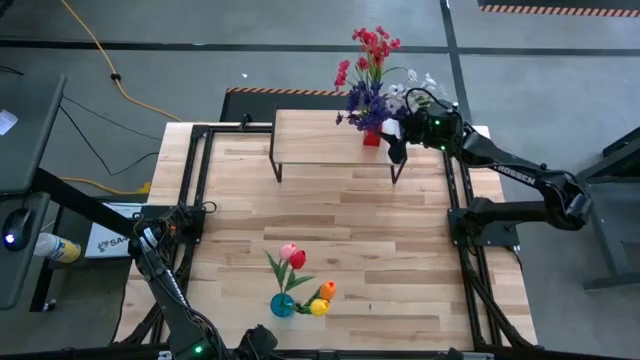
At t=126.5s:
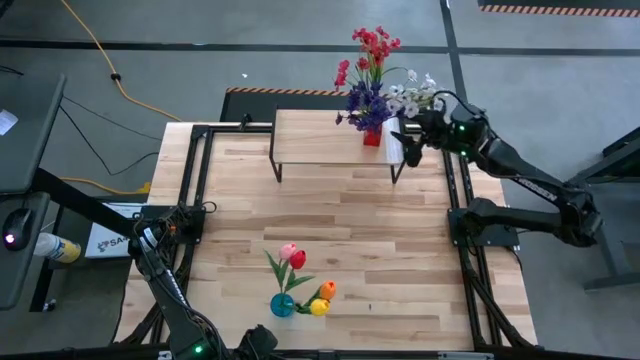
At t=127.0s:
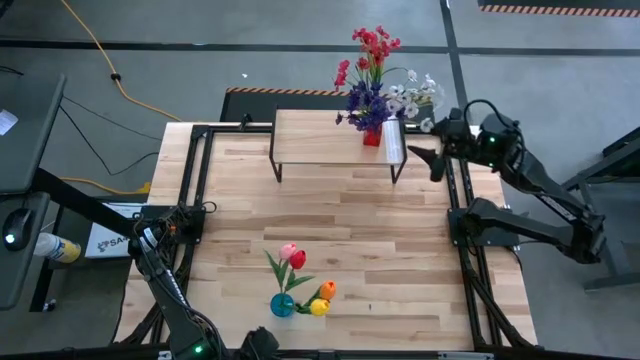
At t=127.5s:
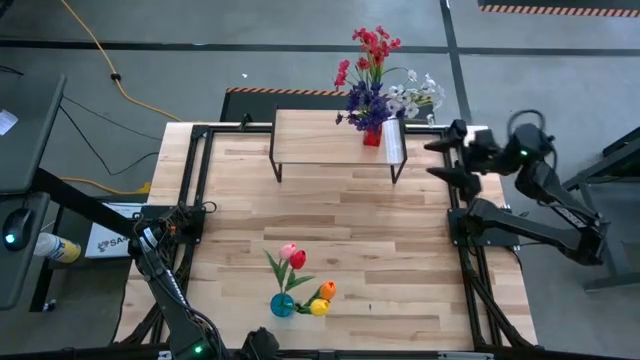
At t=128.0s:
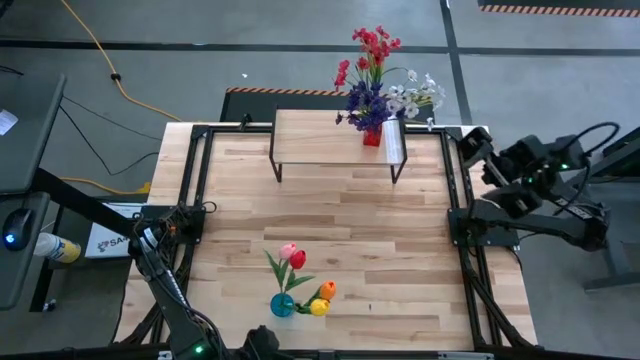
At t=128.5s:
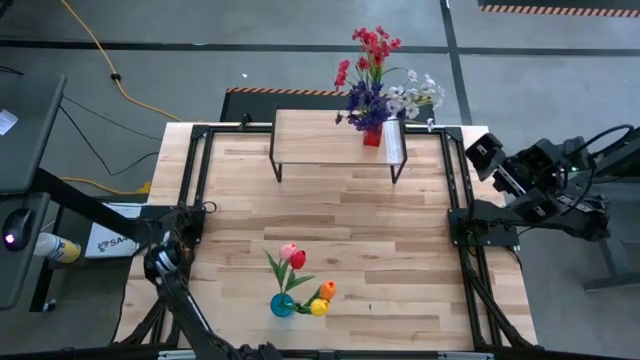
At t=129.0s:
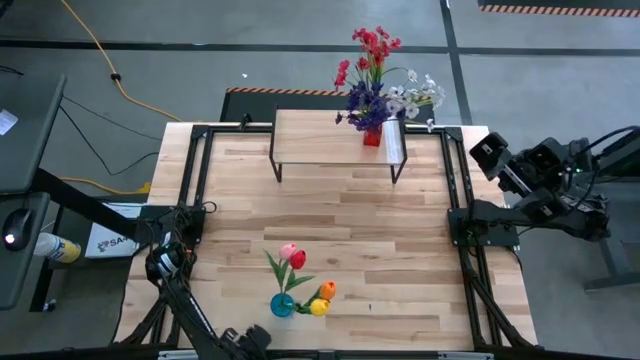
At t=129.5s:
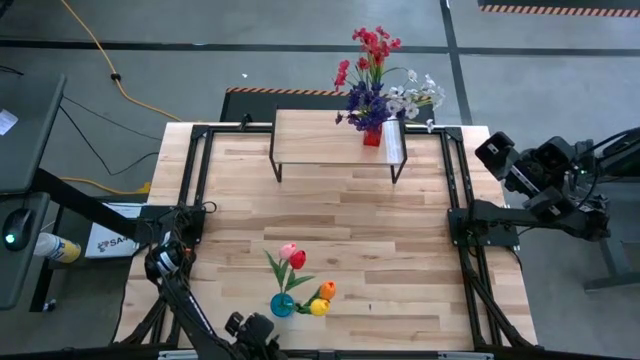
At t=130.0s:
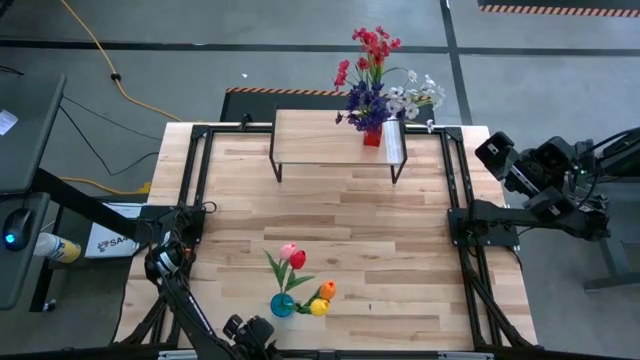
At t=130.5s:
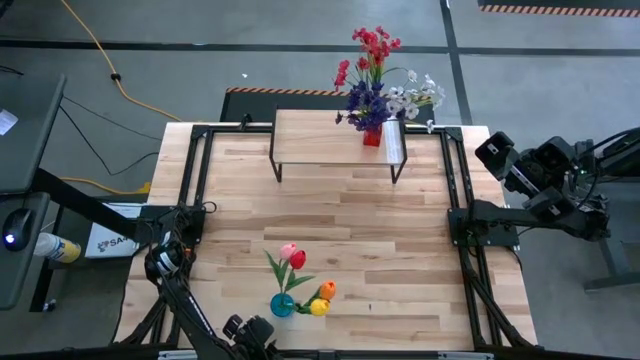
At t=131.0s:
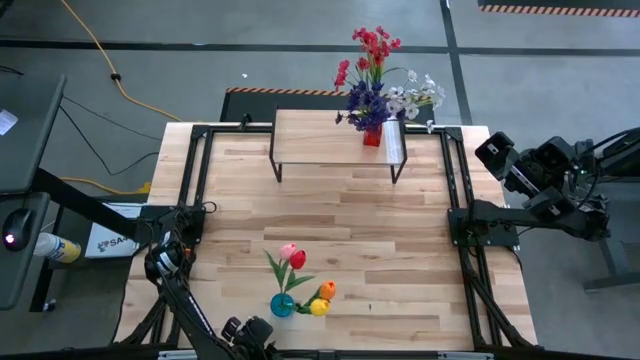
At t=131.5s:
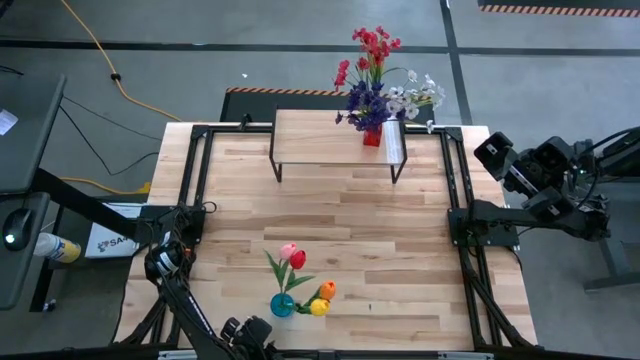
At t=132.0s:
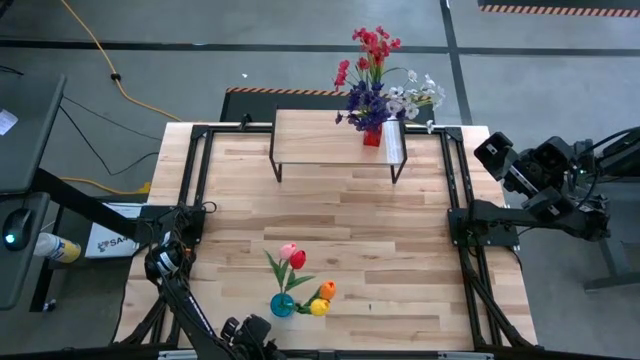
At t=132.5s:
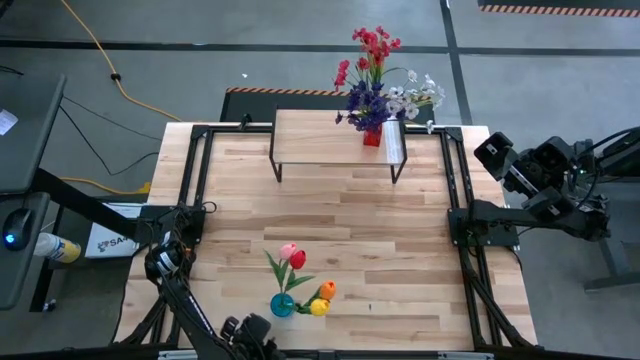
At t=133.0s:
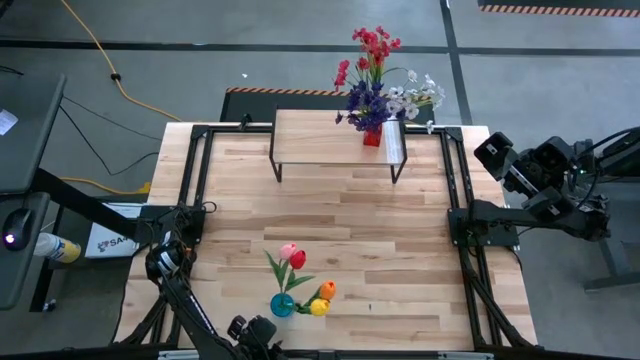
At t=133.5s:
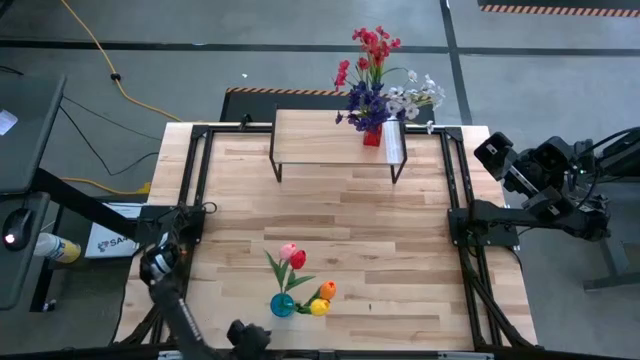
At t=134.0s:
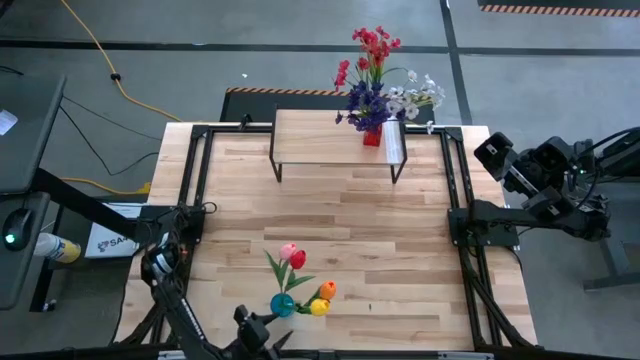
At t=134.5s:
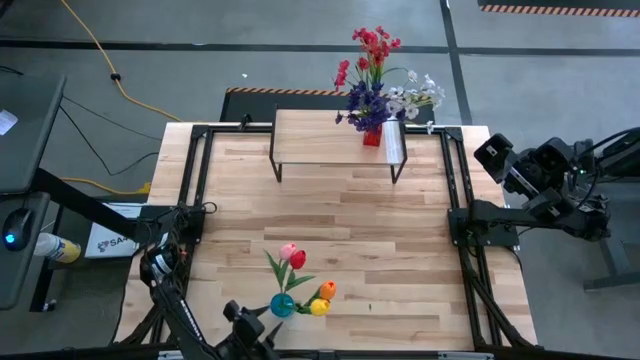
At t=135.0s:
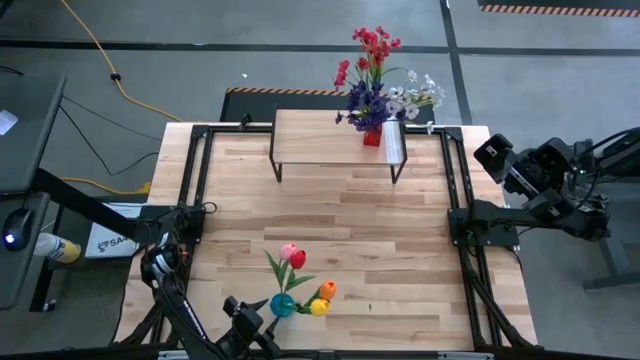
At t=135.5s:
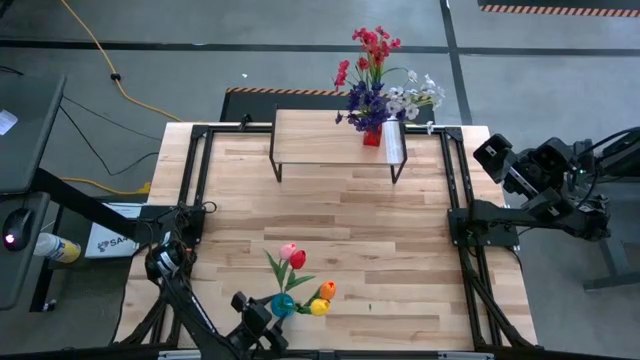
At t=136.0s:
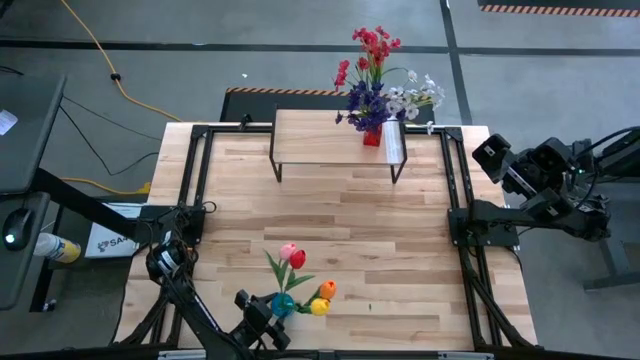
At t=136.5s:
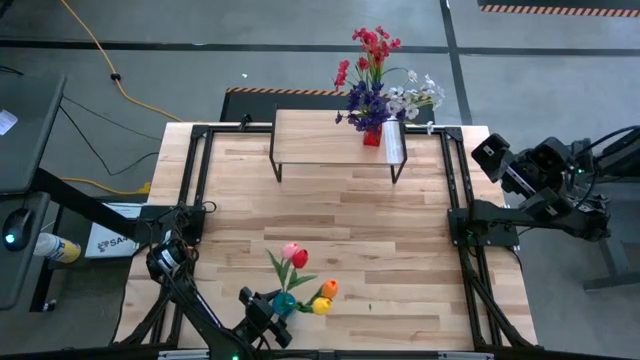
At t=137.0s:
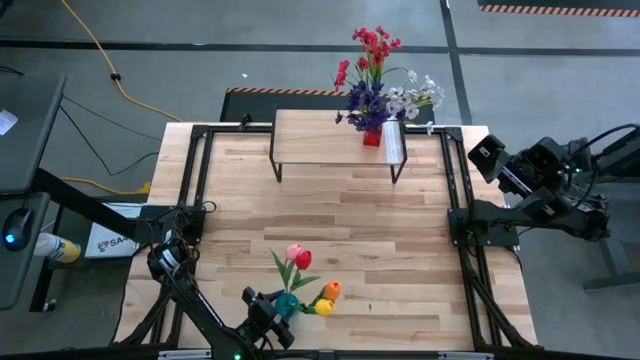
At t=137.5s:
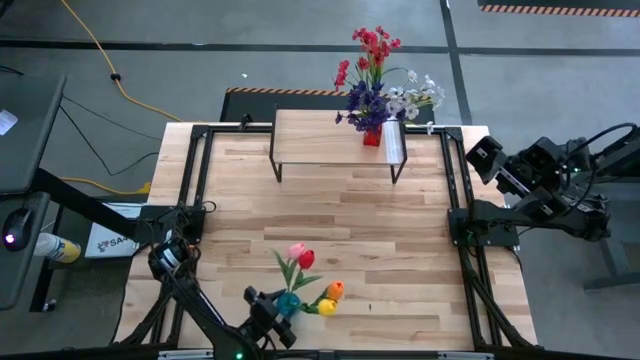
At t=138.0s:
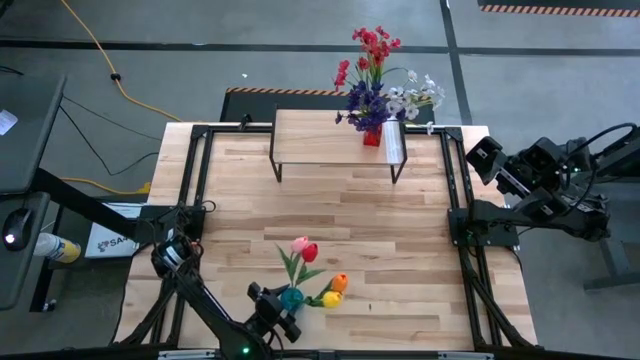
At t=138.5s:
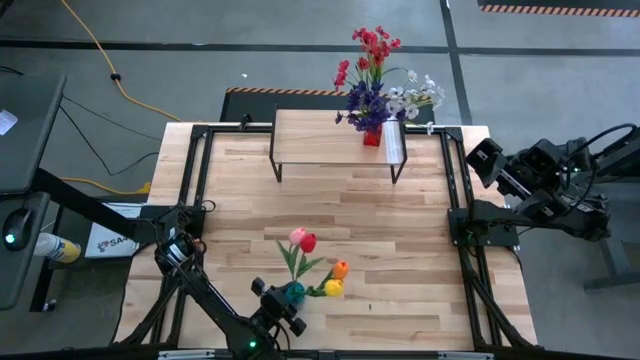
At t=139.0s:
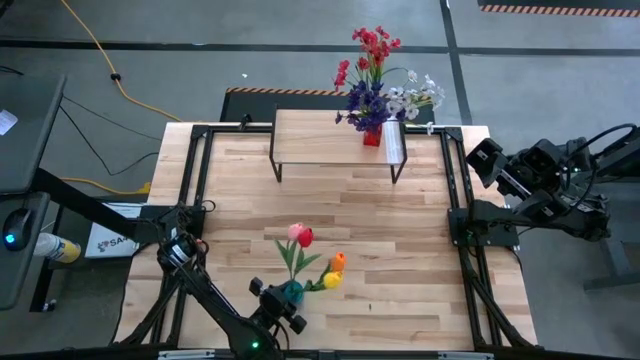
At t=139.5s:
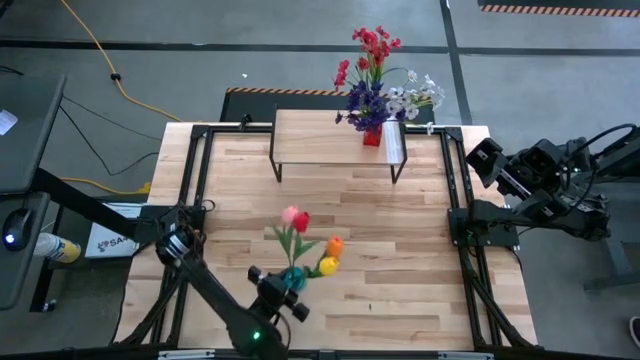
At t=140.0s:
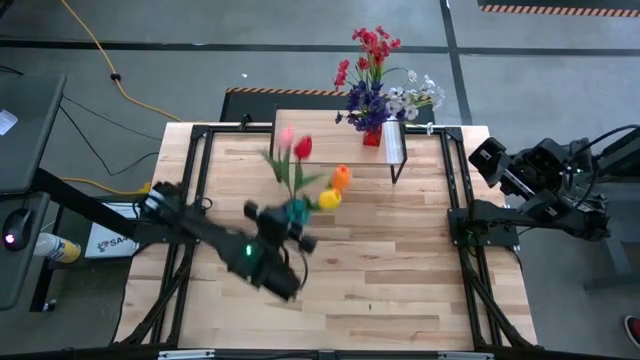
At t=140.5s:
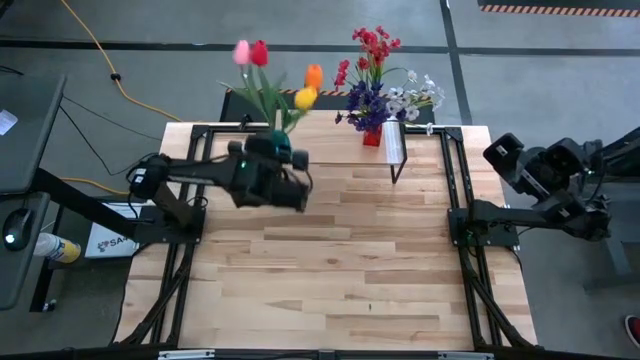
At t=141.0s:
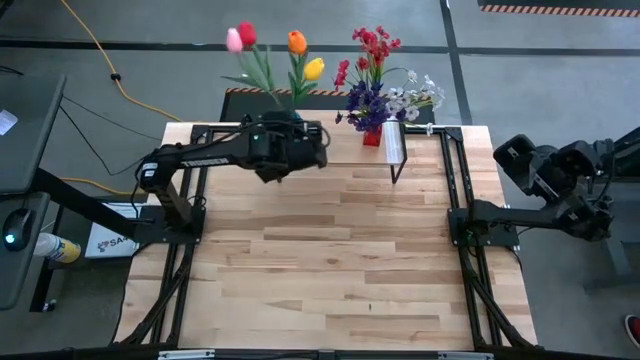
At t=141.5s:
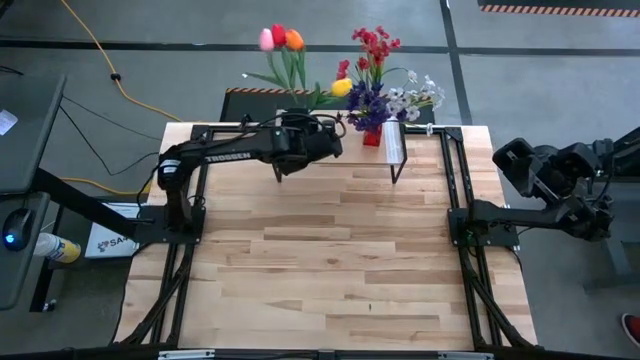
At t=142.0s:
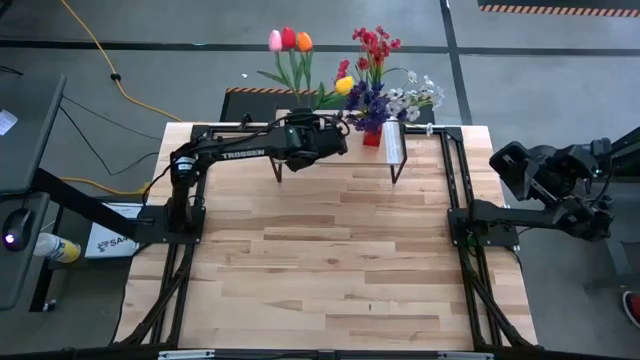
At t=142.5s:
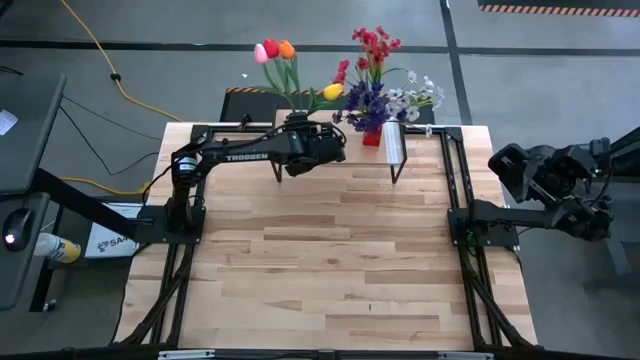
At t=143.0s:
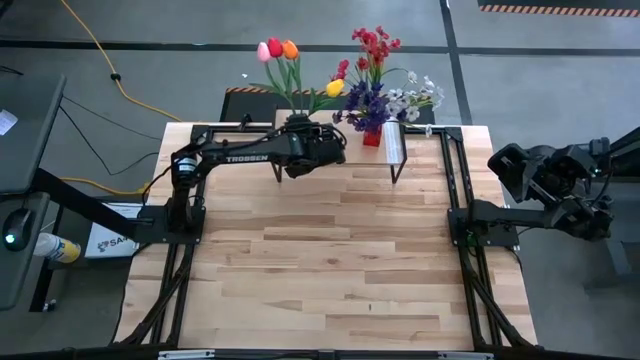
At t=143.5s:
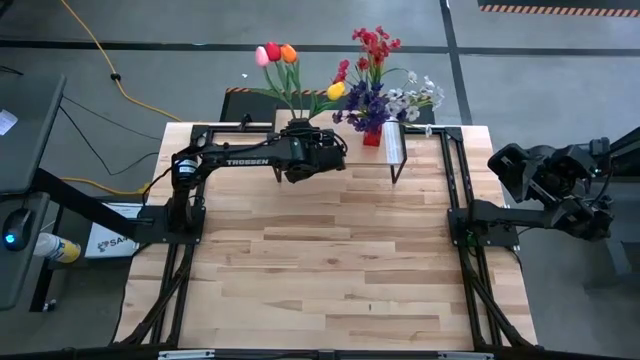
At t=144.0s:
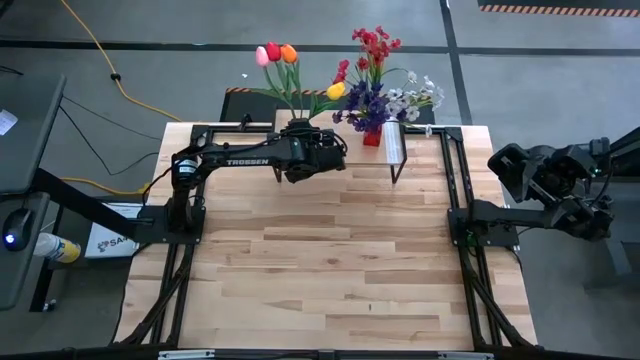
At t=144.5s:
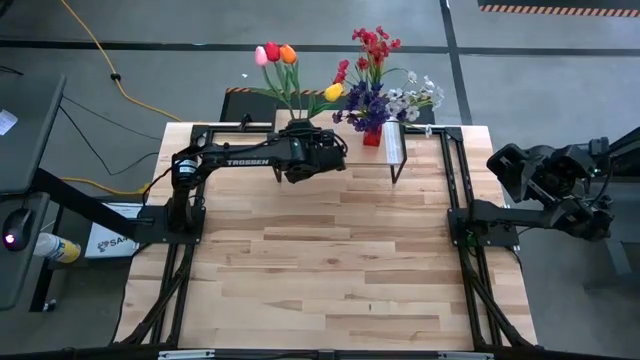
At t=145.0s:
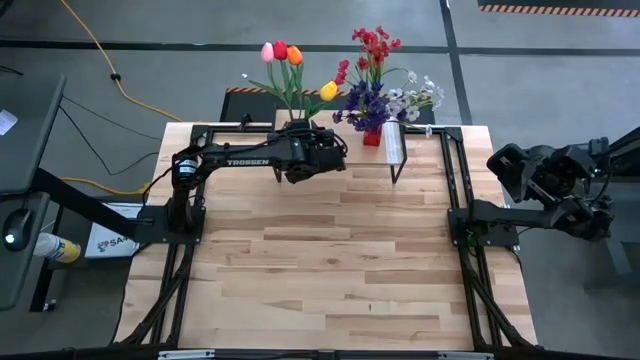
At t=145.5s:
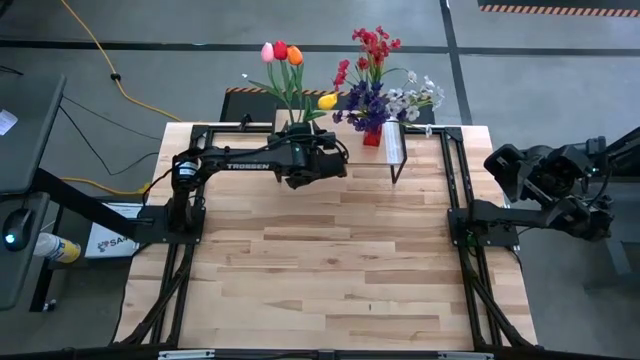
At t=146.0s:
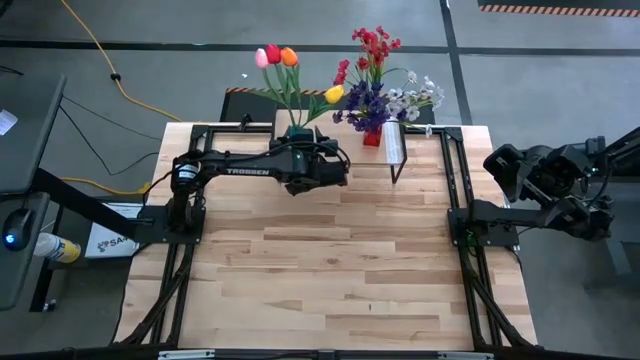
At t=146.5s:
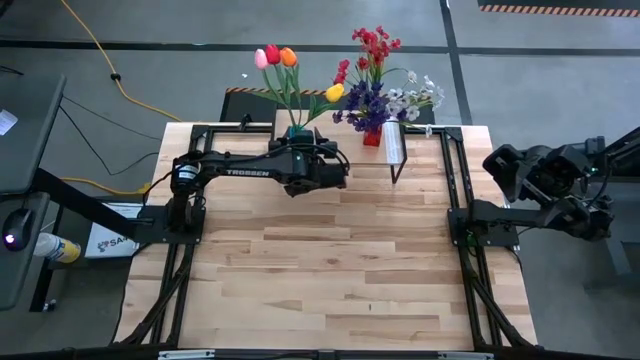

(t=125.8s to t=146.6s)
Task: Pick and place flowers into a vace then onto a shelf
Put the blue transparent flower vase on the shelf
